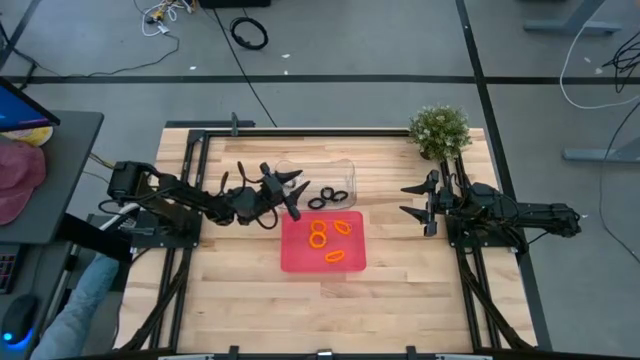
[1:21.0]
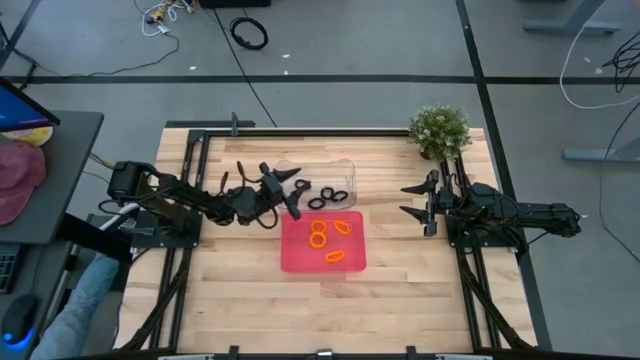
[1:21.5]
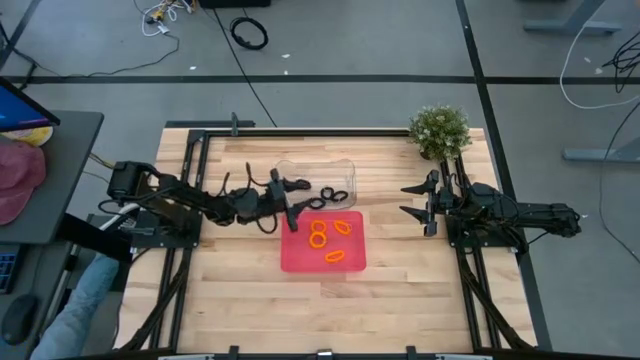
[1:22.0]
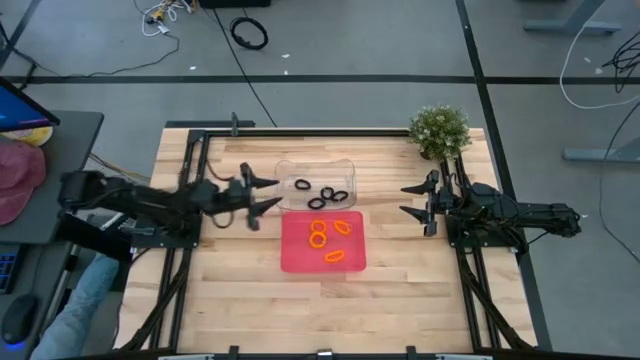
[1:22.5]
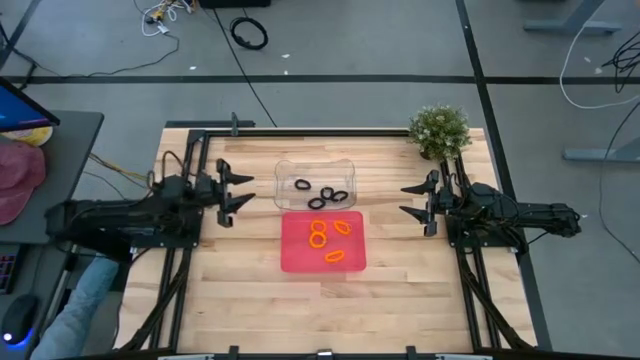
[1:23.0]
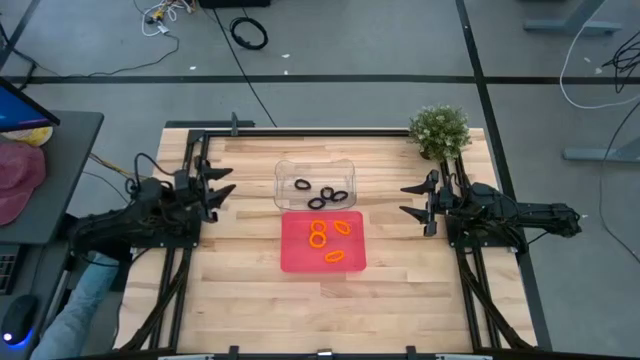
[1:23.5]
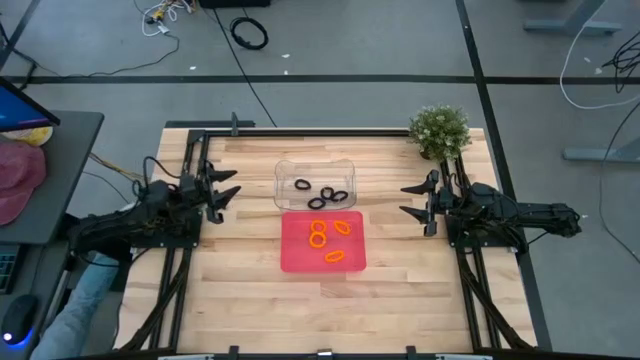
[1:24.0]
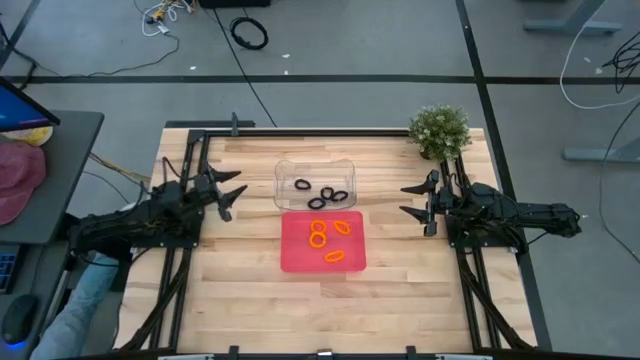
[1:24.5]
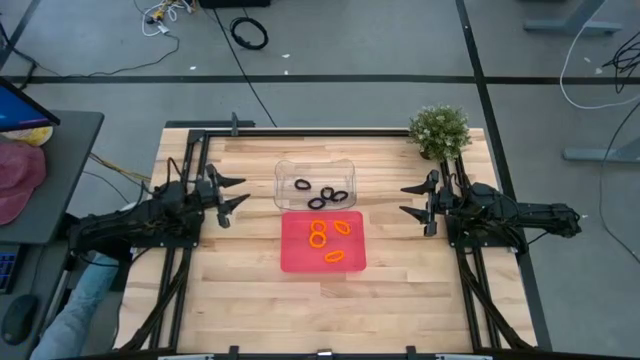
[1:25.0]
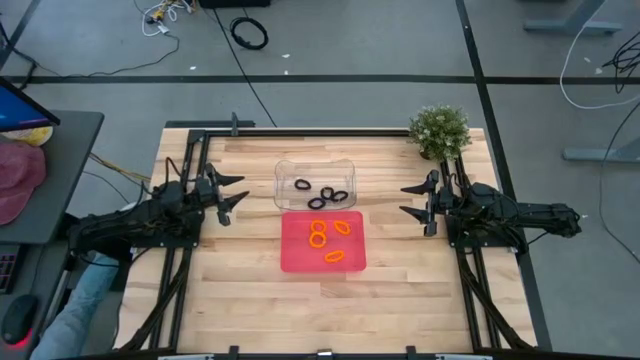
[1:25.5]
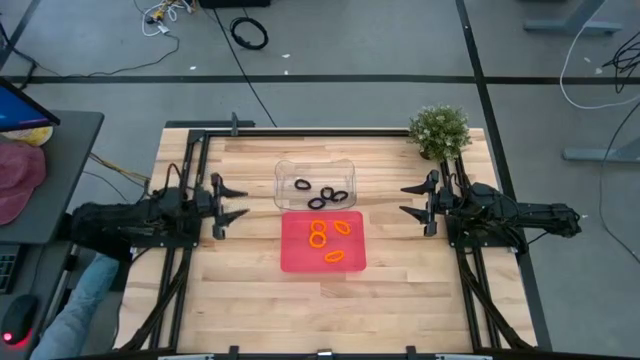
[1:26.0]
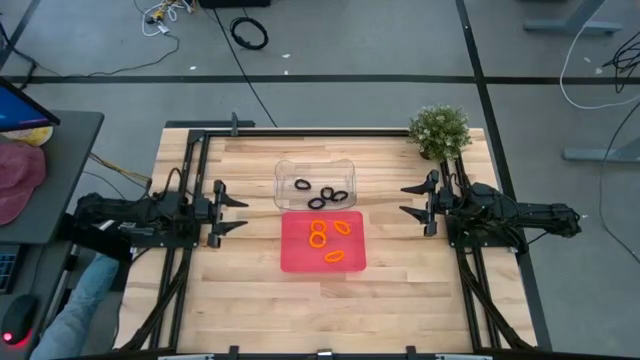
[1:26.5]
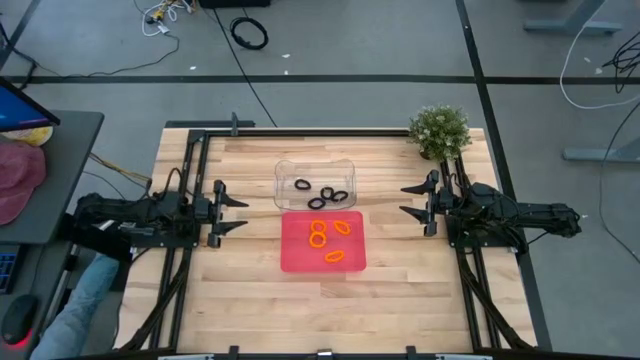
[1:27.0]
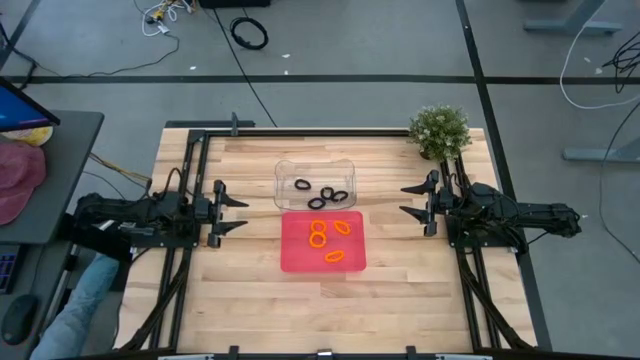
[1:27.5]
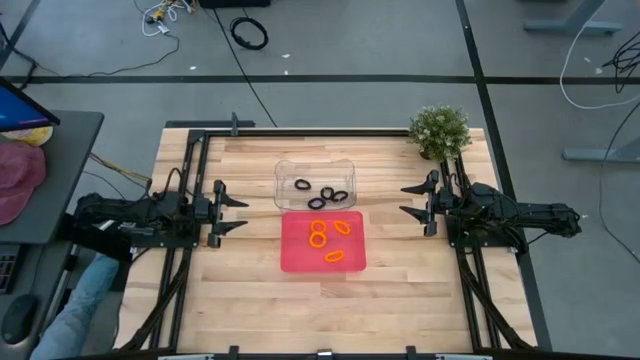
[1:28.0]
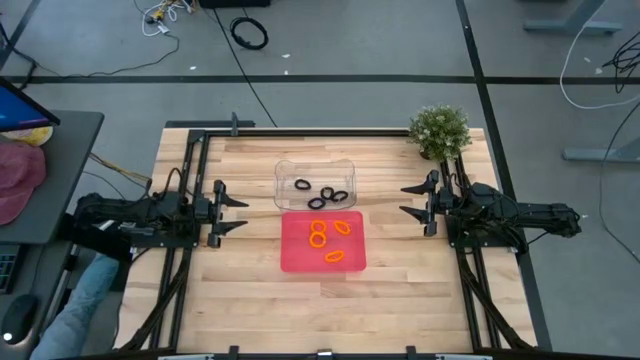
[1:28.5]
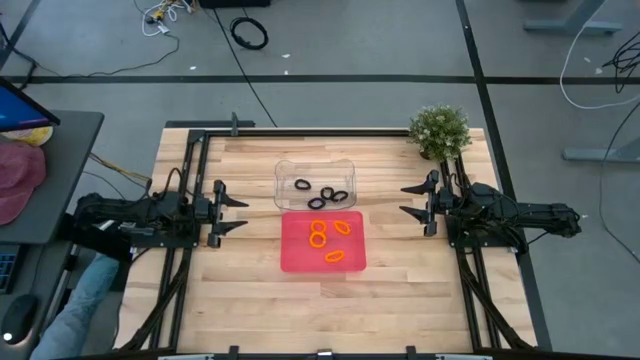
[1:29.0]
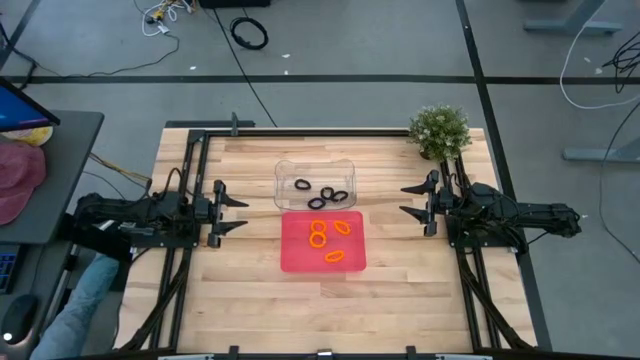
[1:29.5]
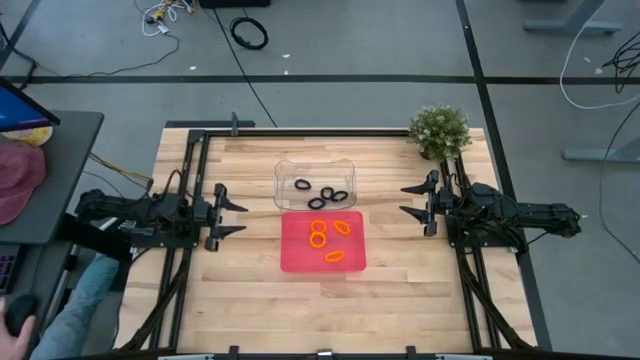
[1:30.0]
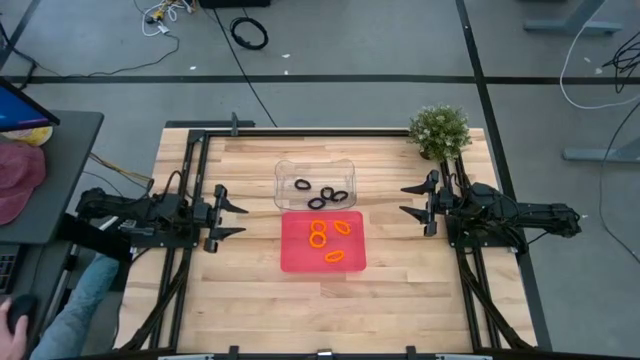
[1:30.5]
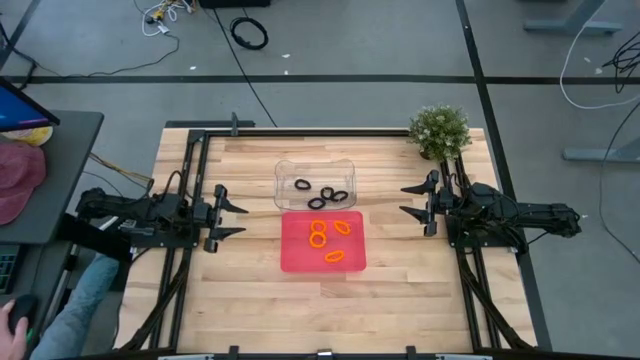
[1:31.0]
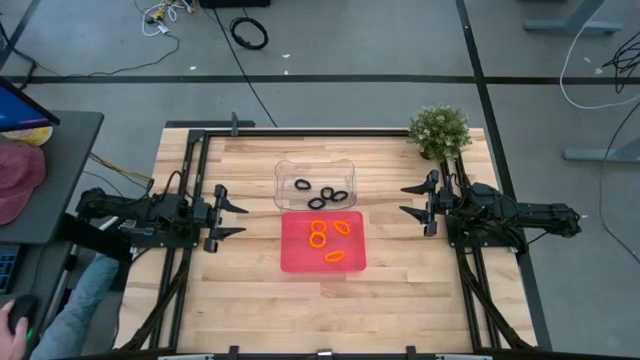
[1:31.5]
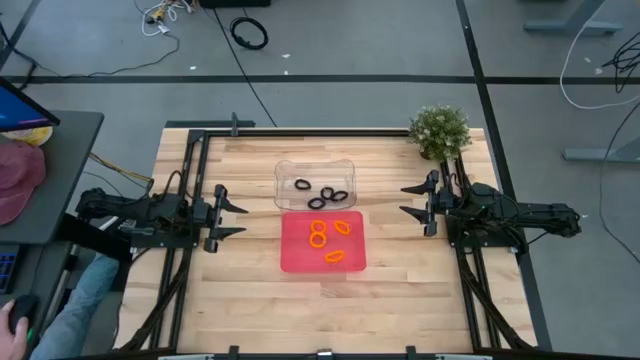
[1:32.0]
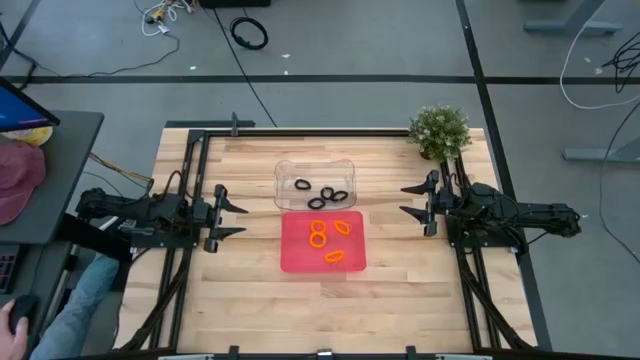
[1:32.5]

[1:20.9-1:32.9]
Task: Sort spring keychains
Return to Home Position

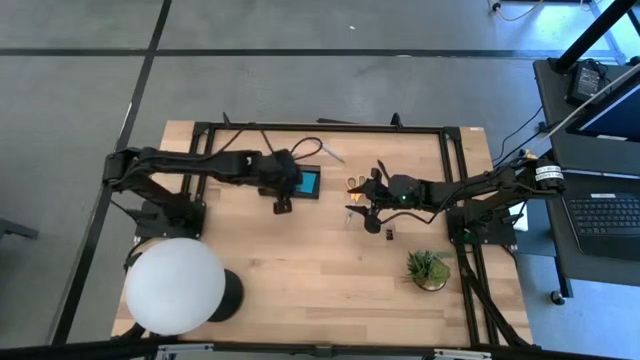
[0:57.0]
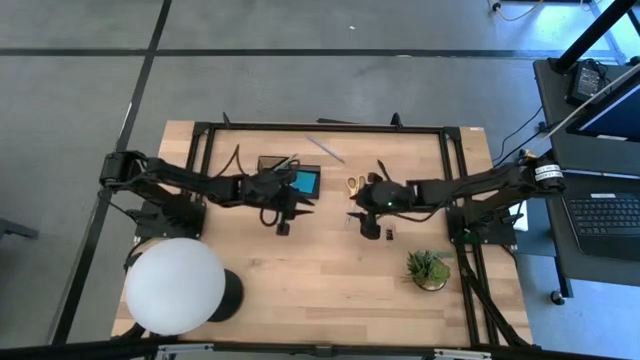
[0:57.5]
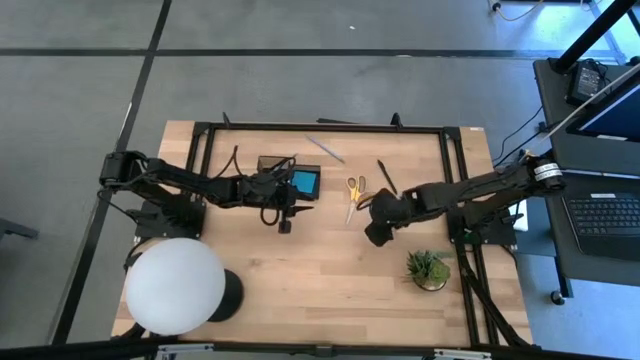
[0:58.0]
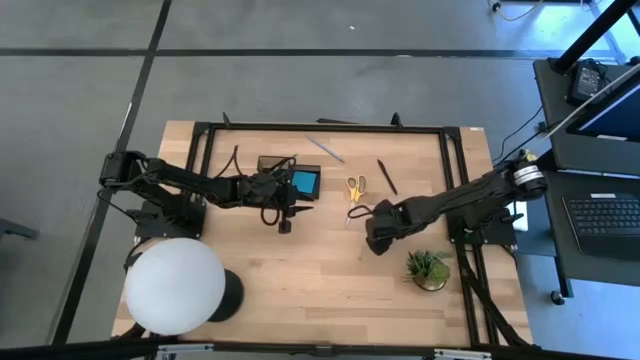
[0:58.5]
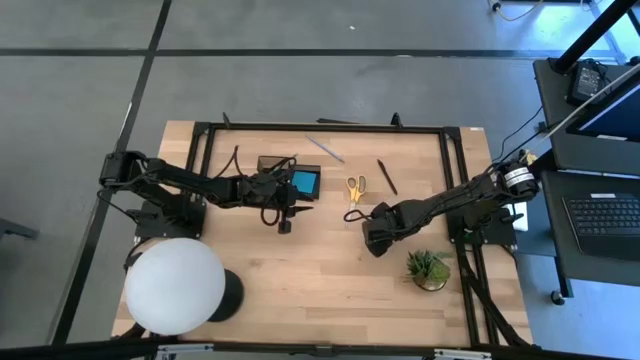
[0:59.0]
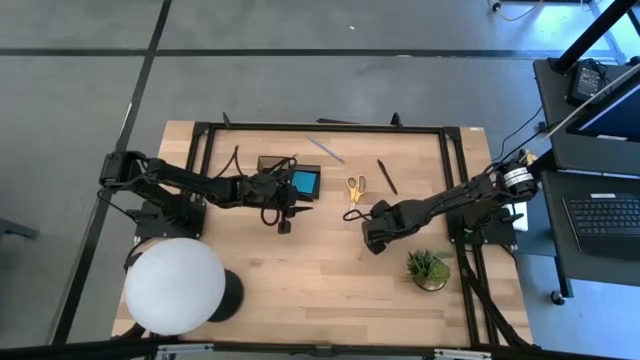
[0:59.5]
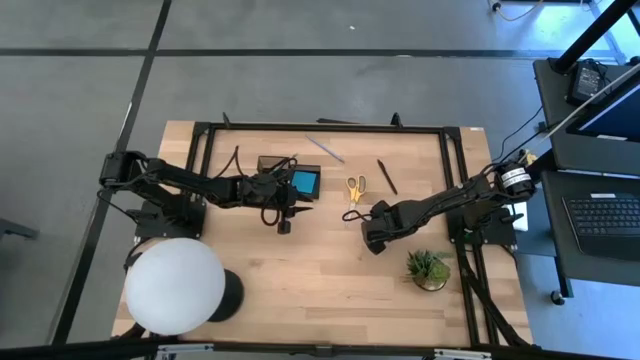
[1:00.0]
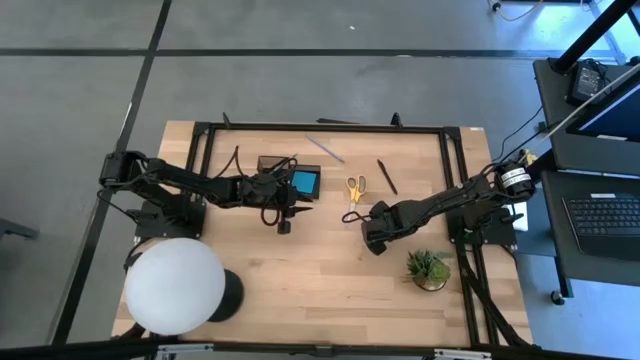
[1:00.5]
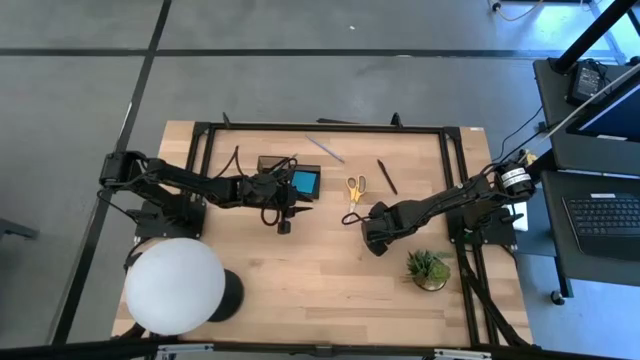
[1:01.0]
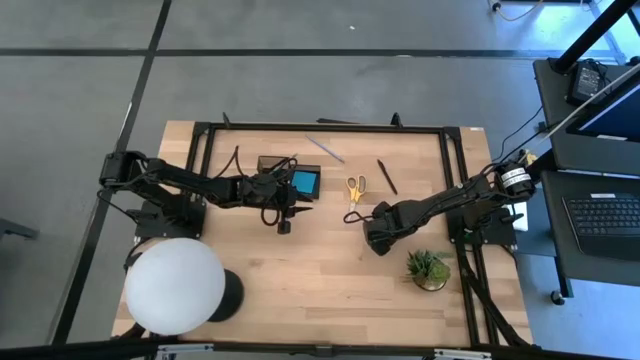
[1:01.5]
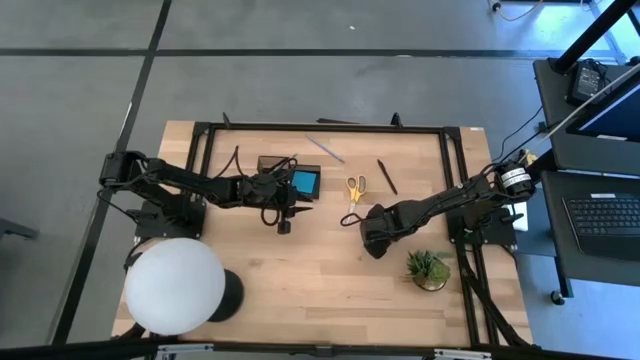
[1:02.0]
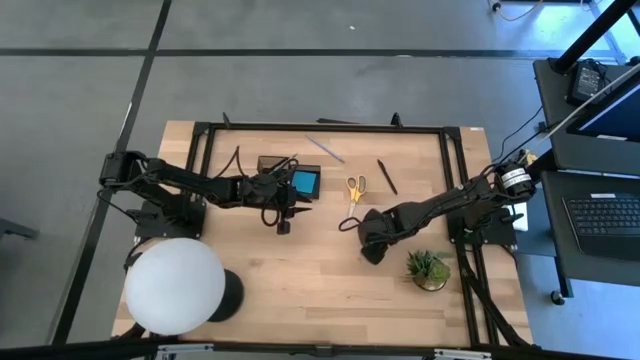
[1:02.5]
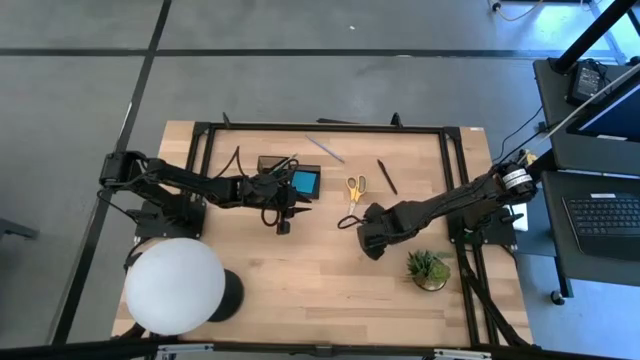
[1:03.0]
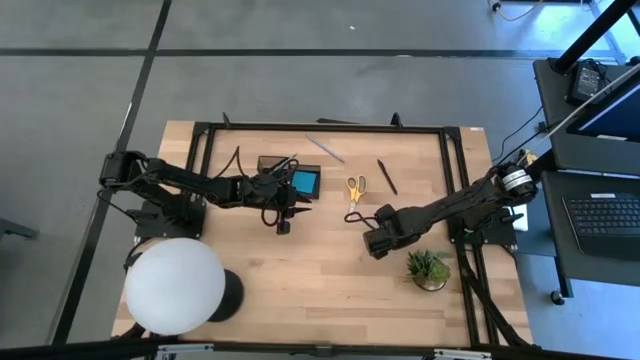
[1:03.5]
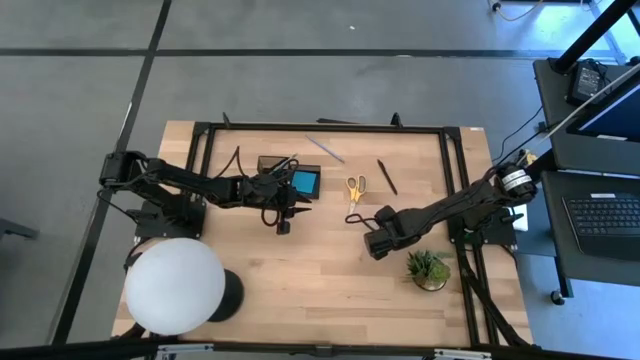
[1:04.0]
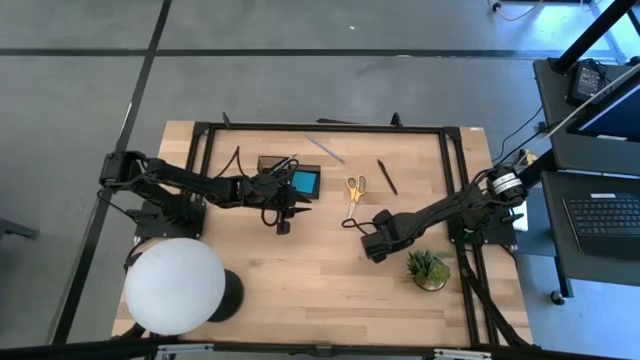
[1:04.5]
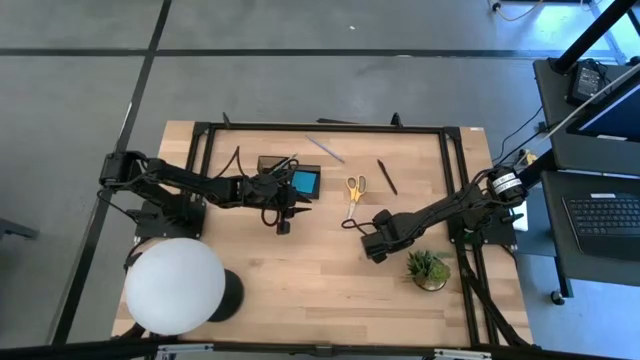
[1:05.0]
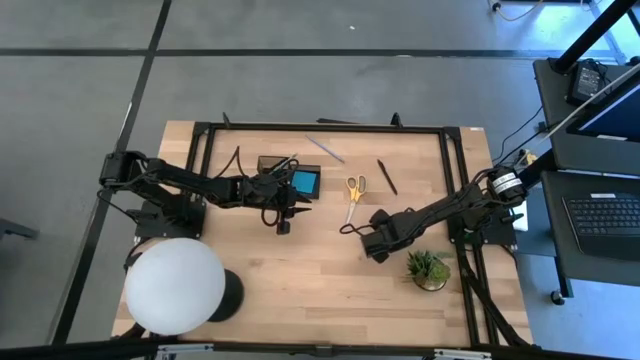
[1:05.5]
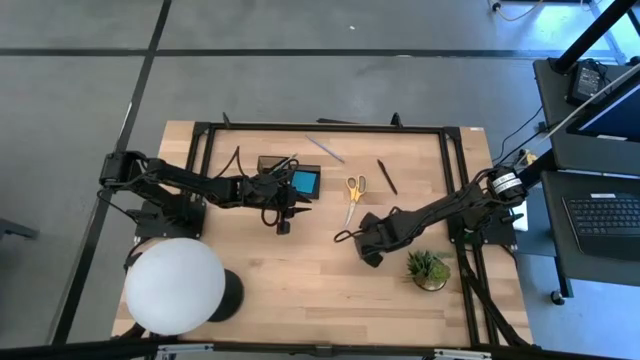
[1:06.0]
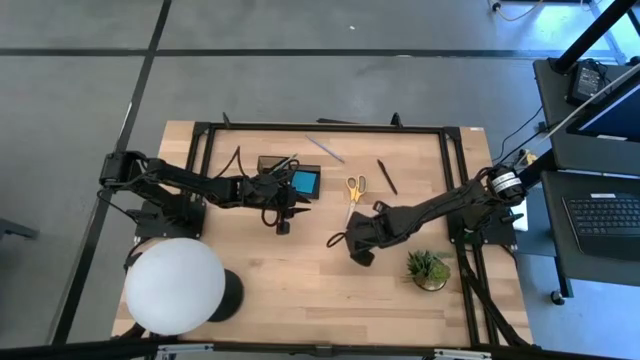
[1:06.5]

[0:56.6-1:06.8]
Task: Pick and place office supplies into organizer
Put the black binder clip into the black desk organizer
